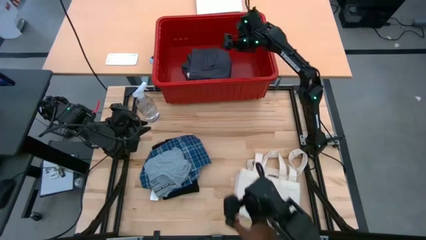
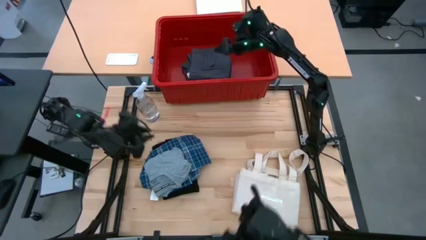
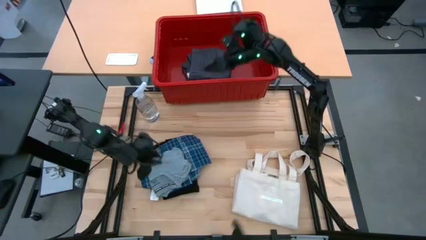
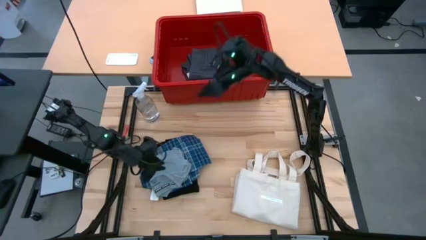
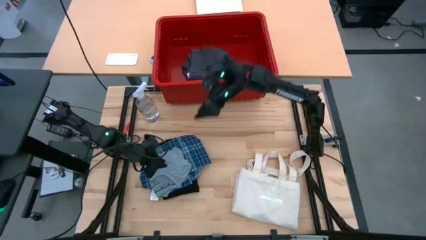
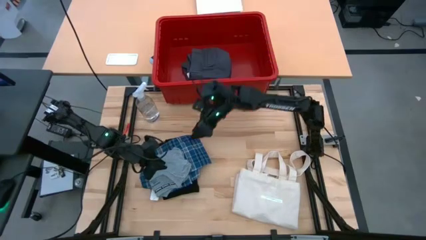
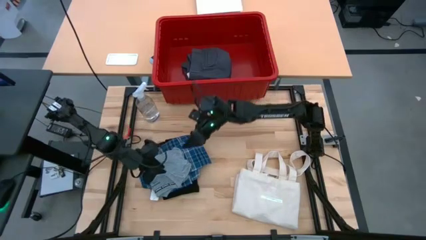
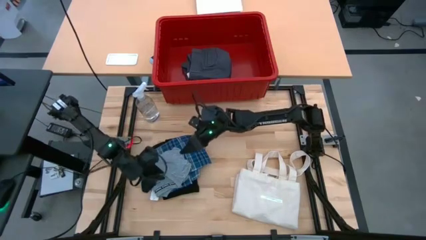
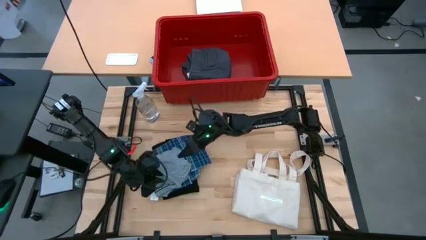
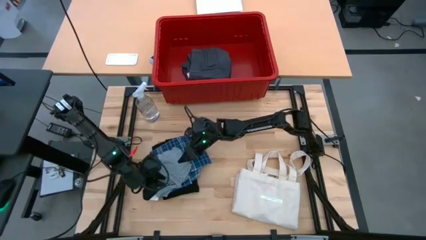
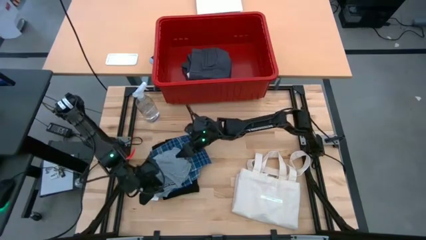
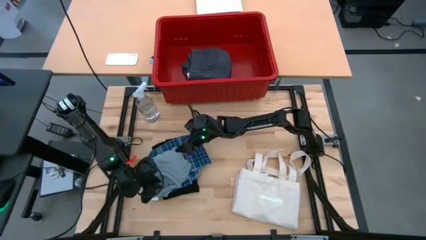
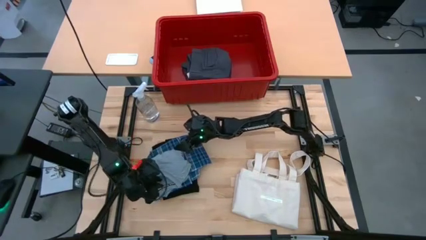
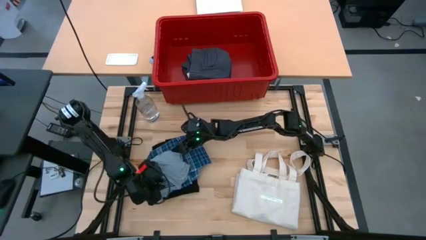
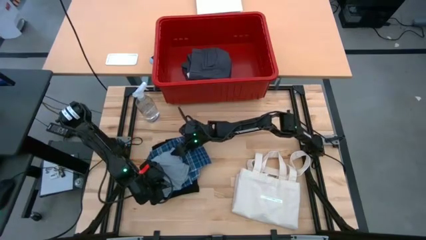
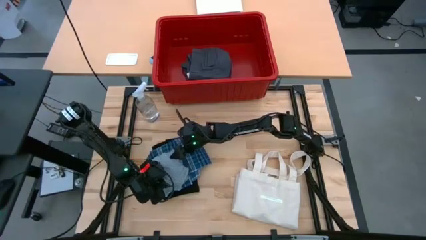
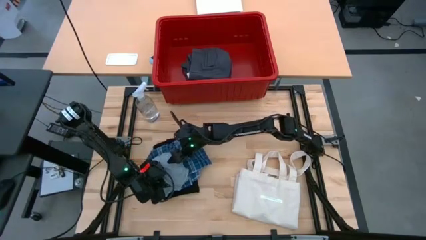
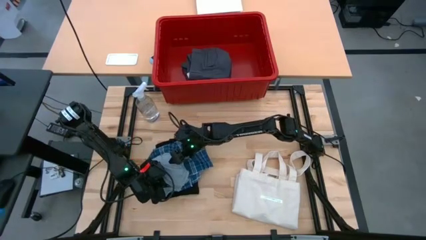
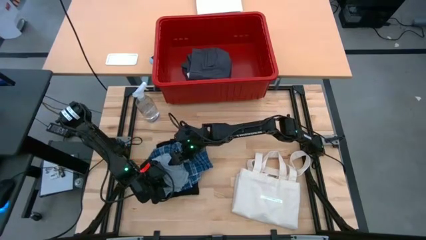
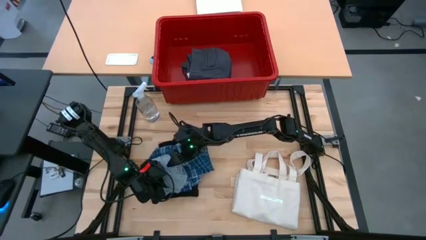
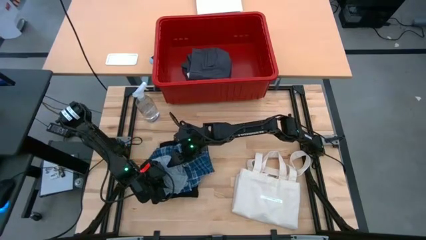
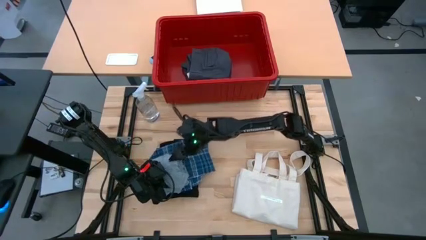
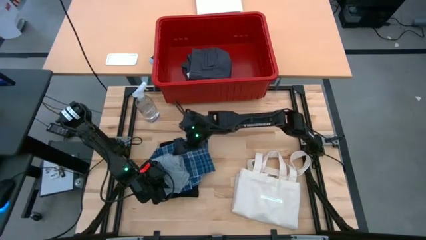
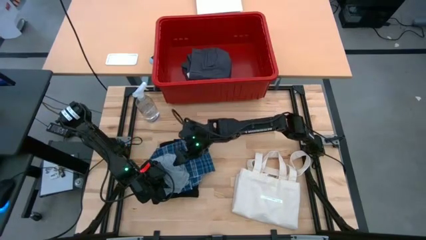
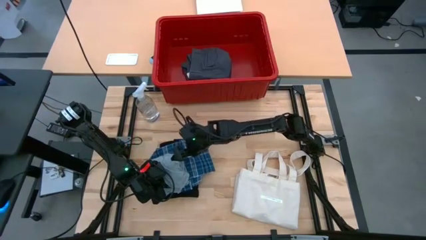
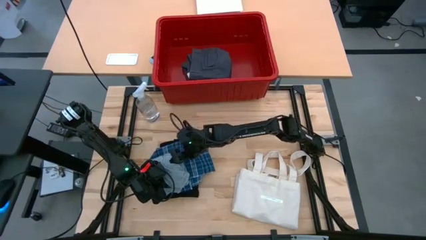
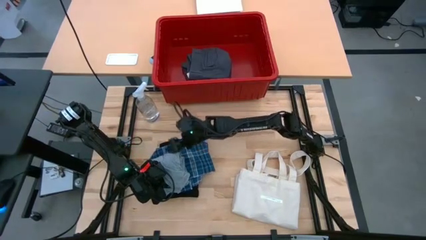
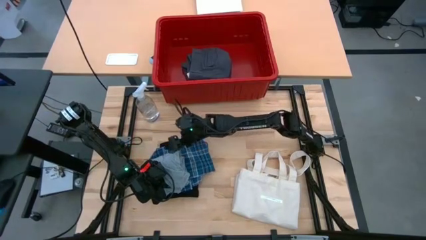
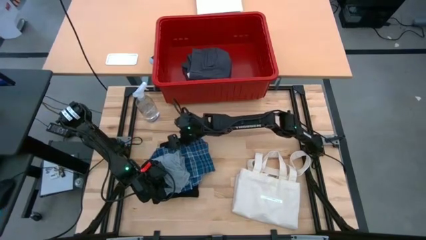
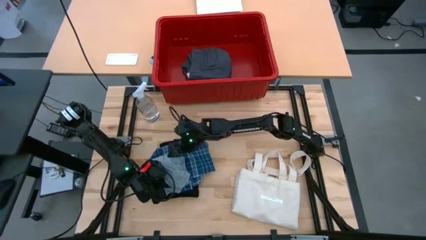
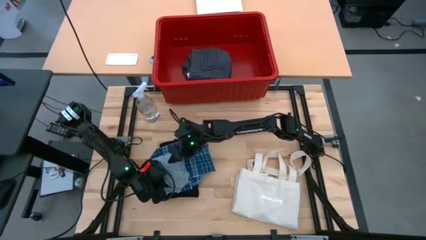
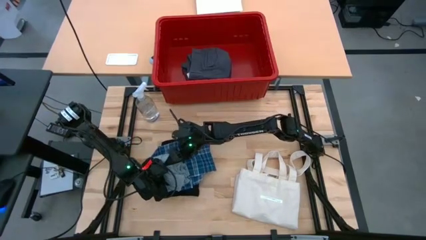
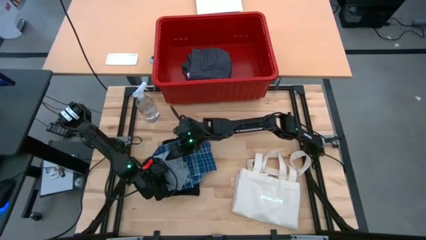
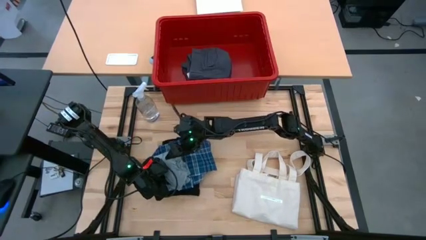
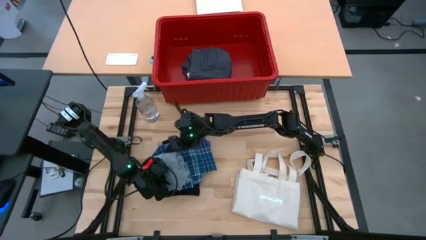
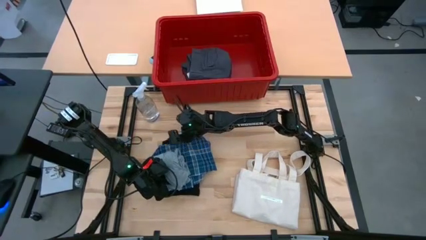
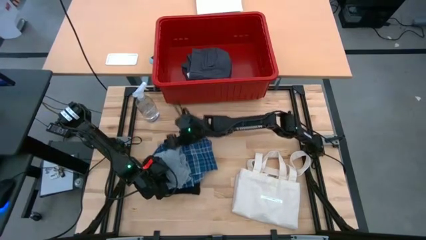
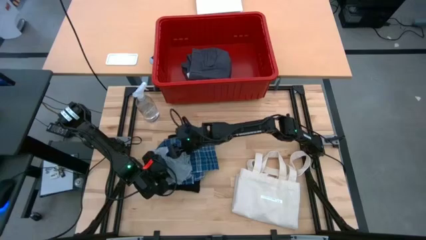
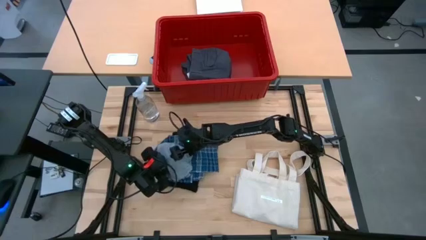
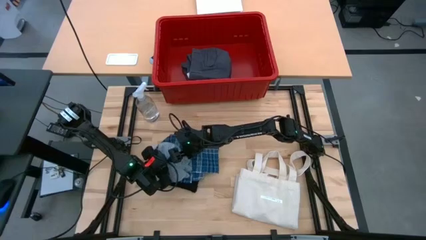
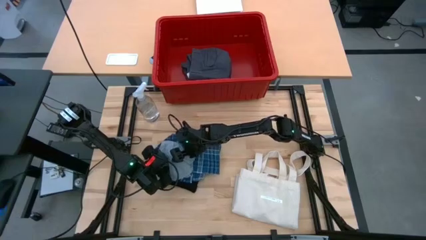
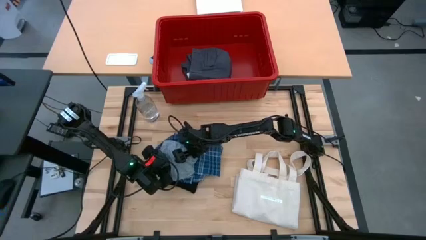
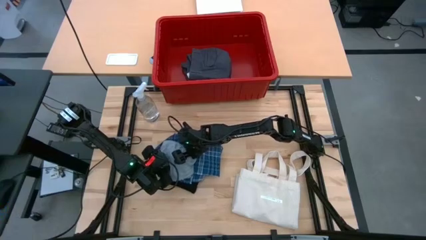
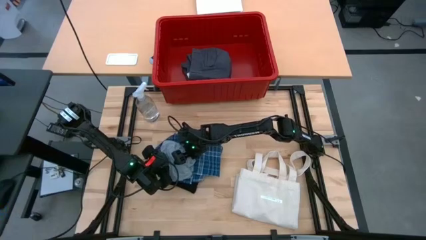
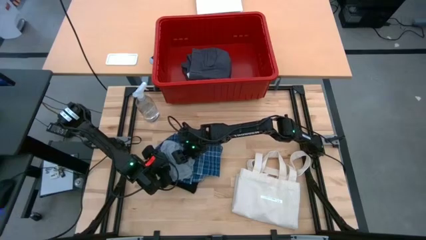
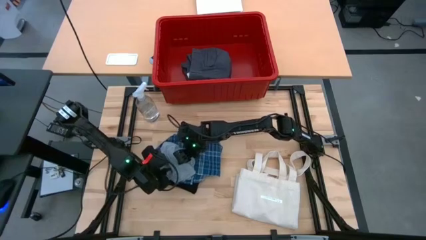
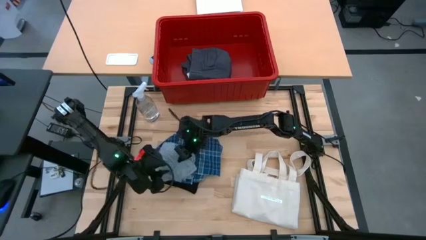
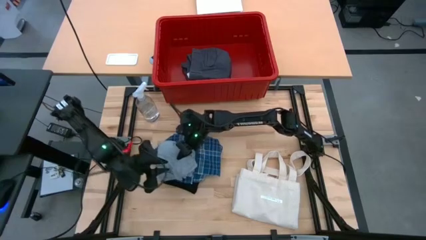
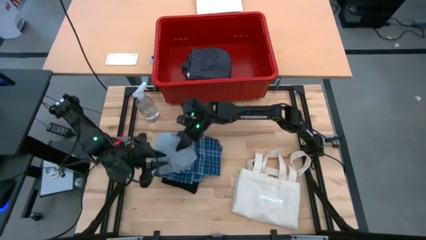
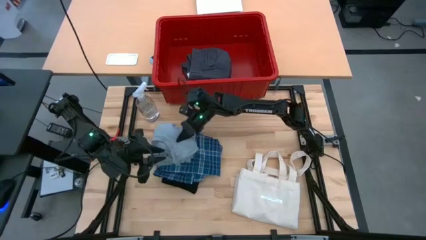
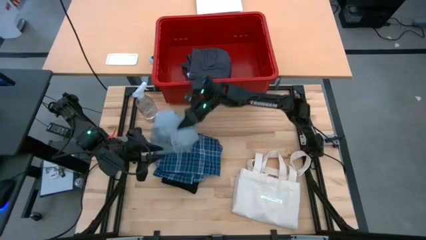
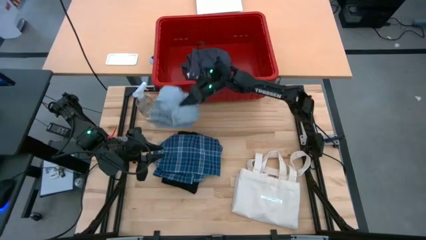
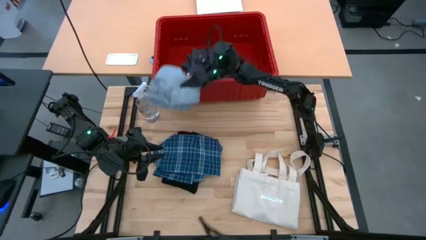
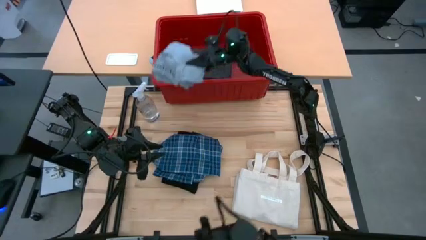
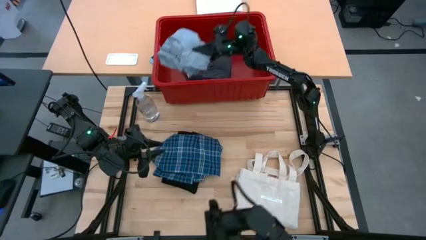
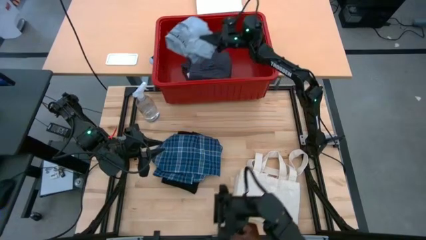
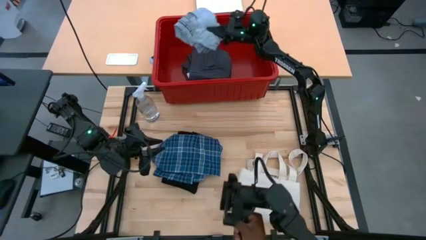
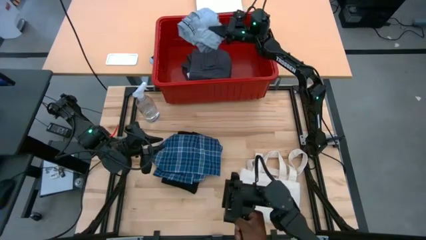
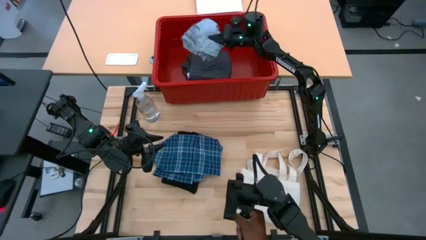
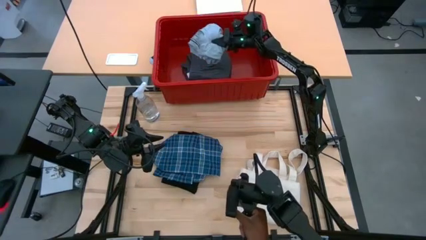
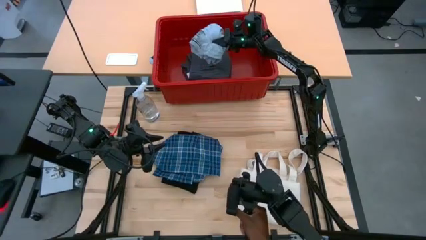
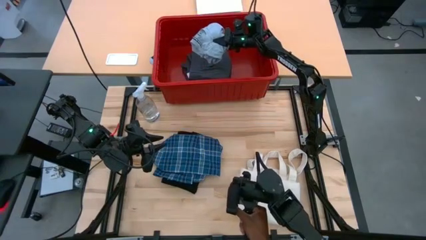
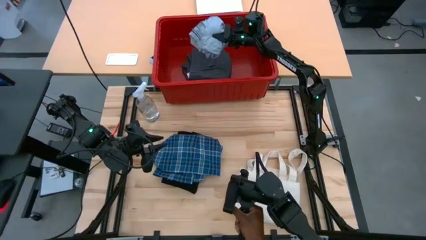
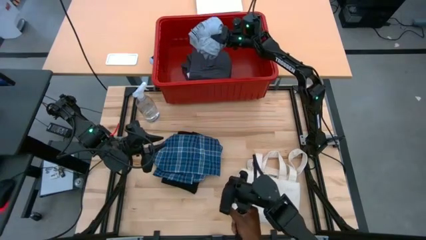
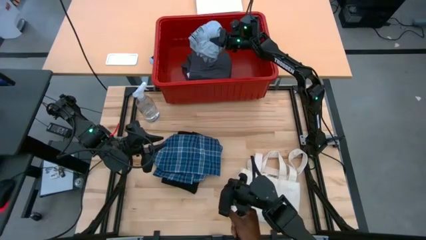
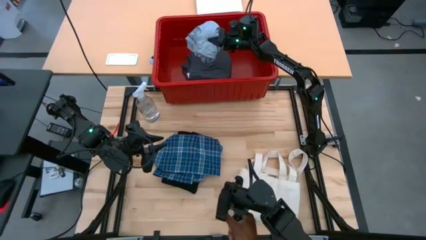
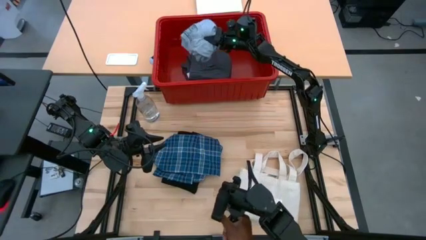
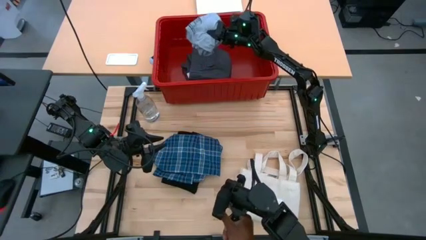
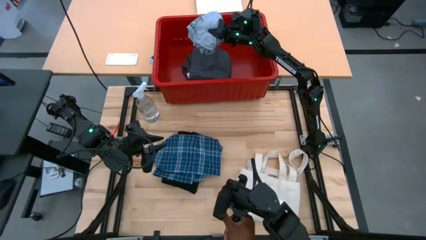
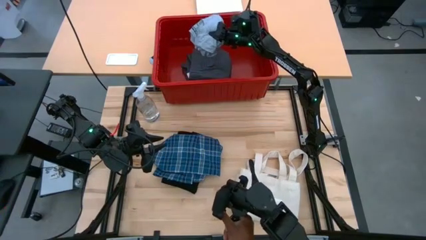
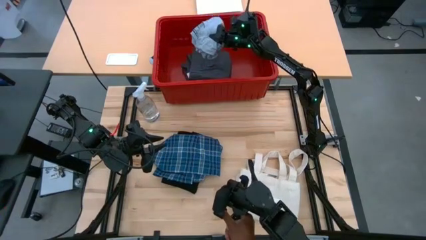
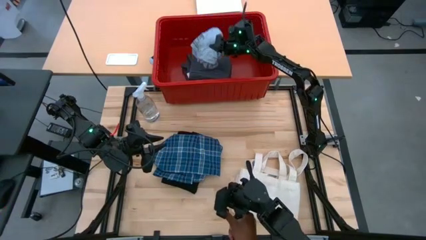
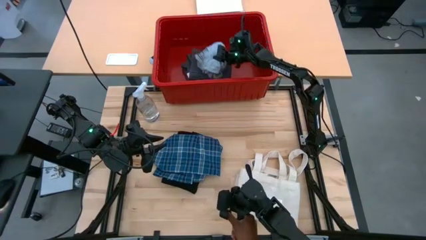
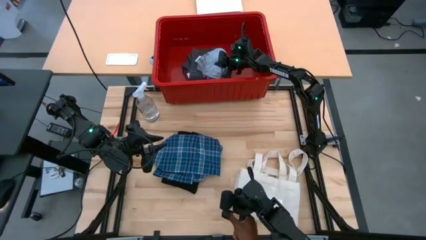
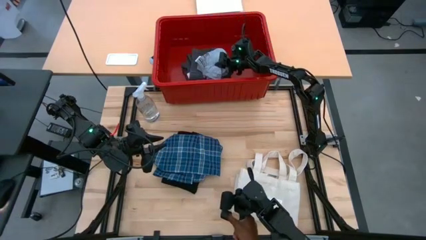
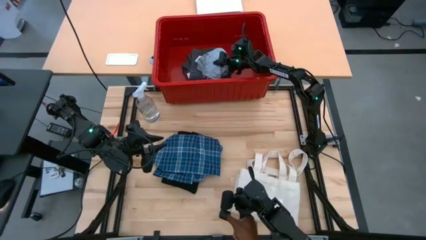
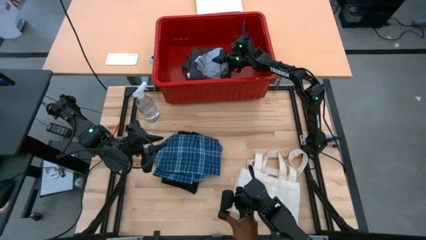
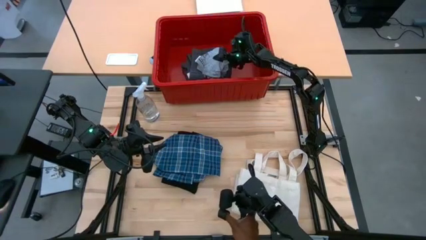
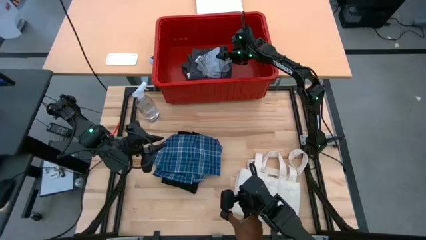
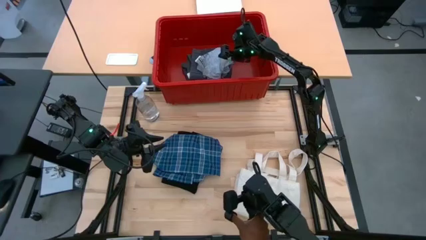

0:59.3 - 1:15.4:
Task: Fold laundry
Put the gray shirt into the red bin
